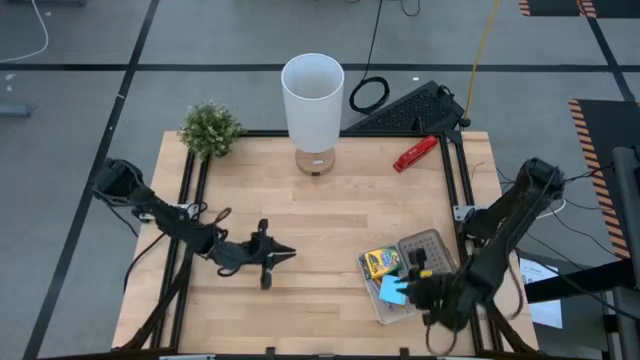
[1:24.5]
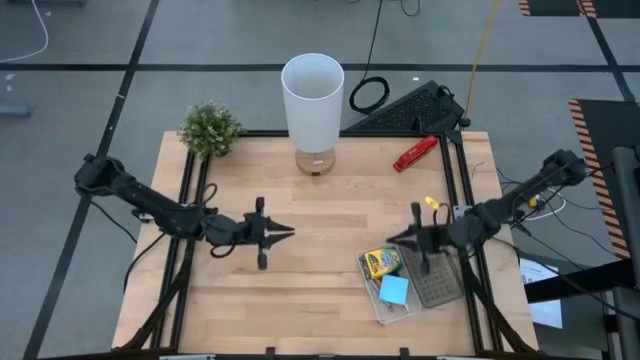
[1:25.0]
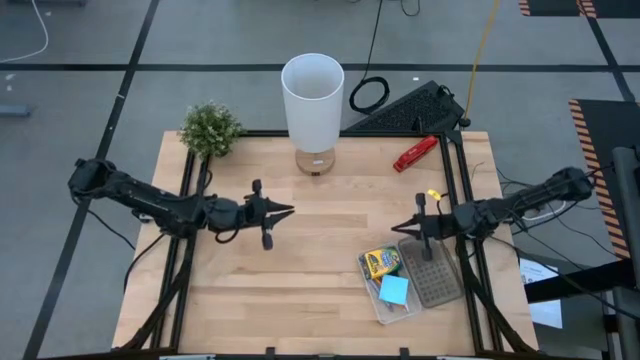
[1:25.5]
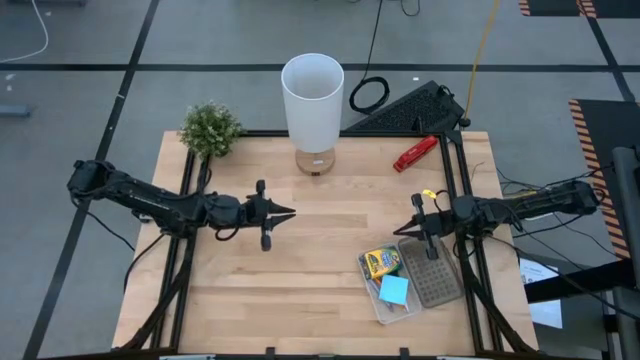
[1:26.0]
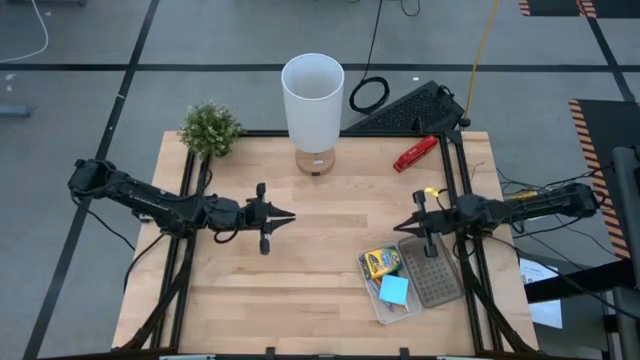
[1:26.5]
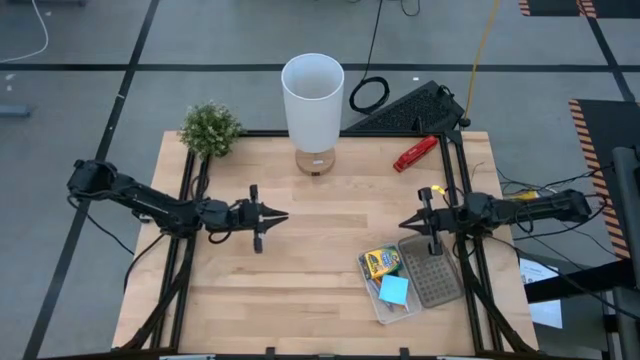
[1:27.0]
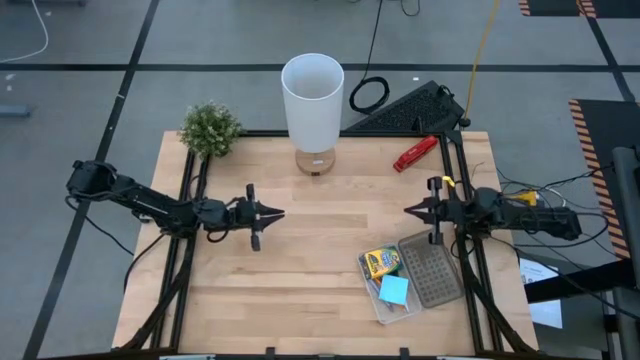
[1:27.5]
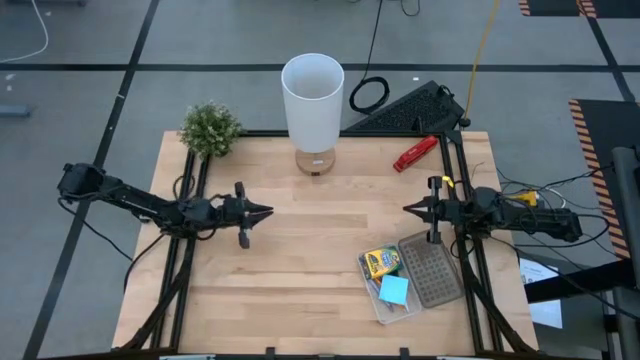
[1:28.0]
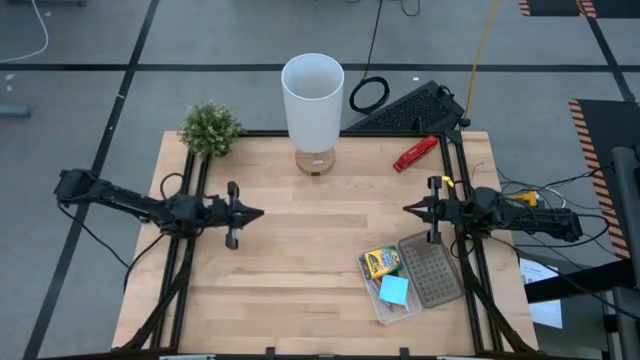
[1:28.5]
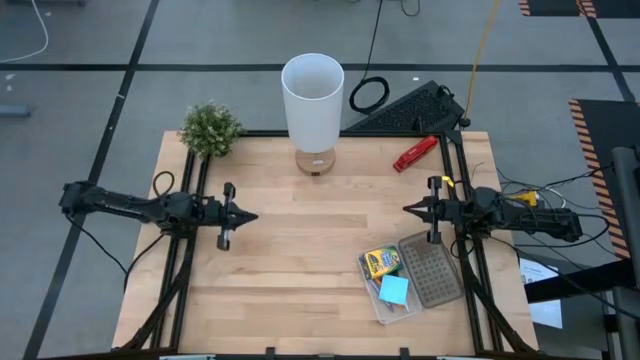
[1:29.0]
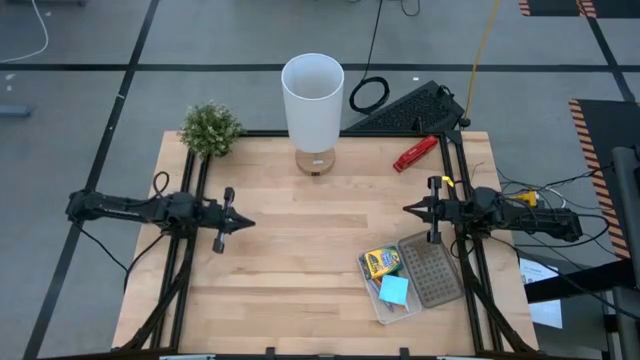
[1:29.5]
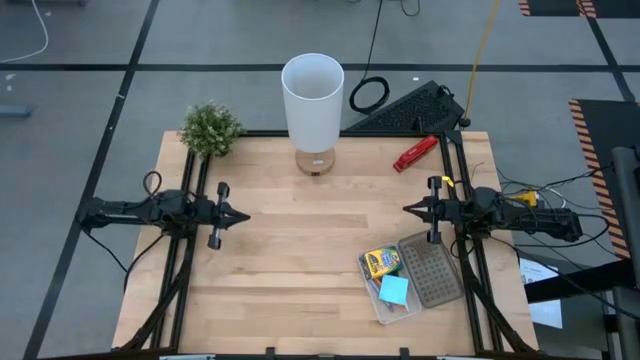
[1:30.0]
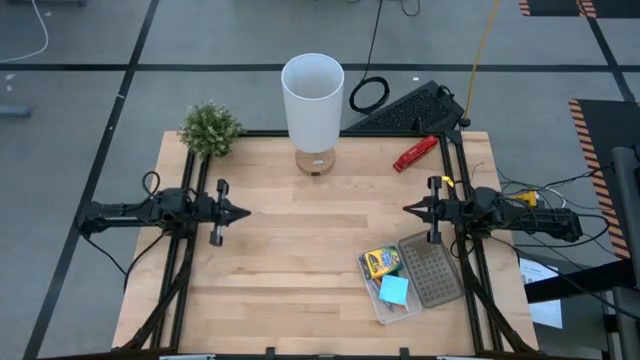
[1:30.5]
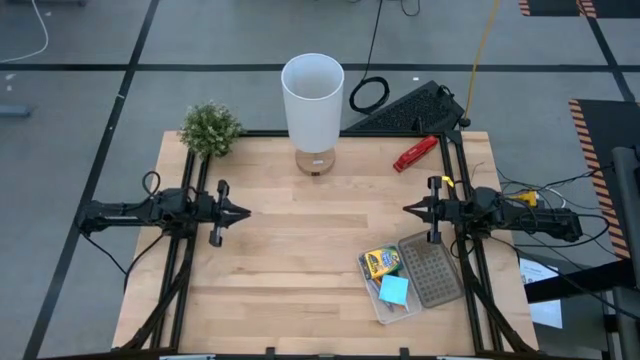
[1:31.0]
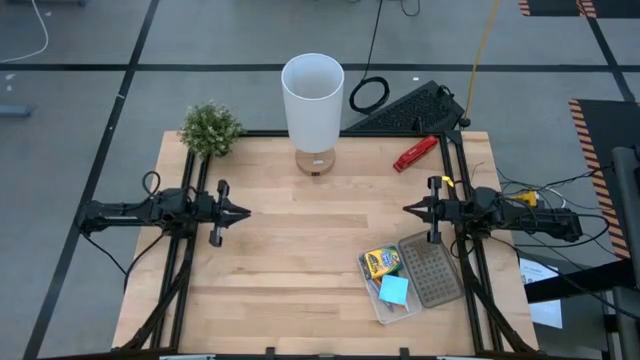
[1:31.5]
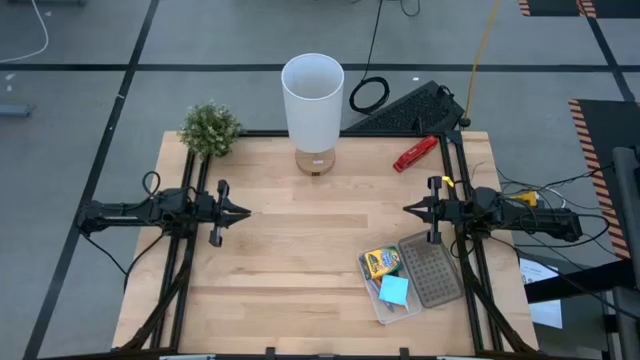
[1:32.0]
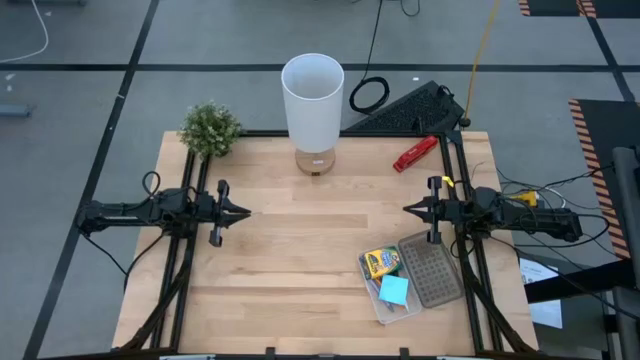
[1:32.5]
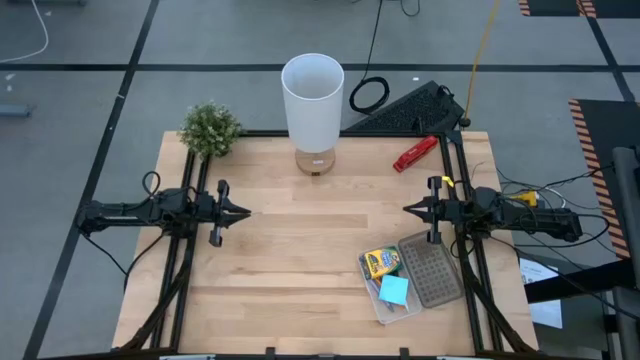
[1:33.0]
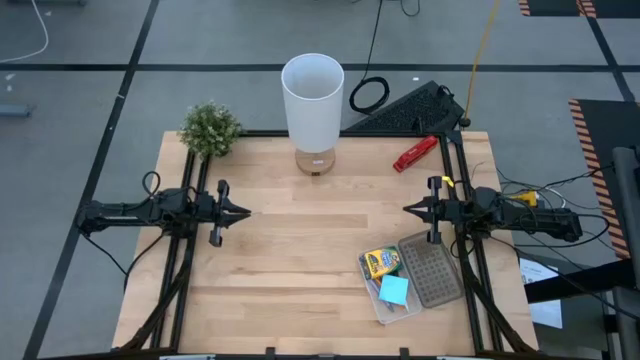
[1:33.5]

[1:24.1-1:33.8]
Task: Pack school essentials
Return to Home Position

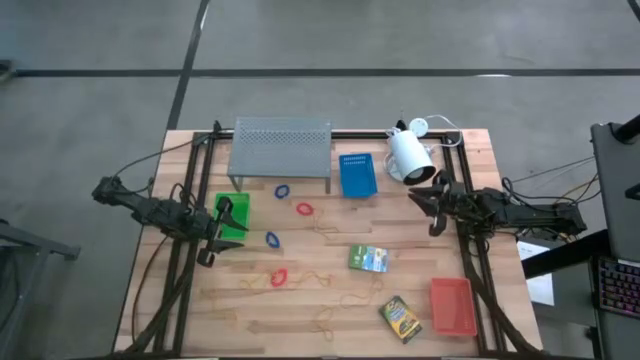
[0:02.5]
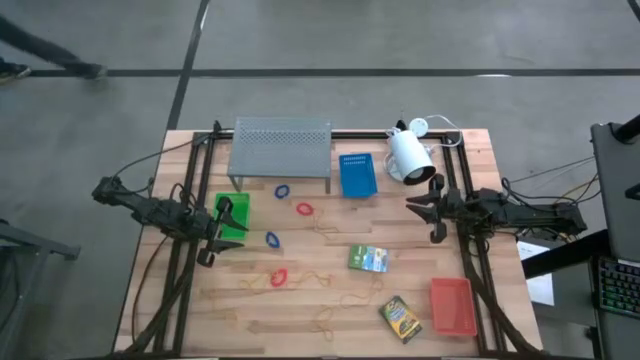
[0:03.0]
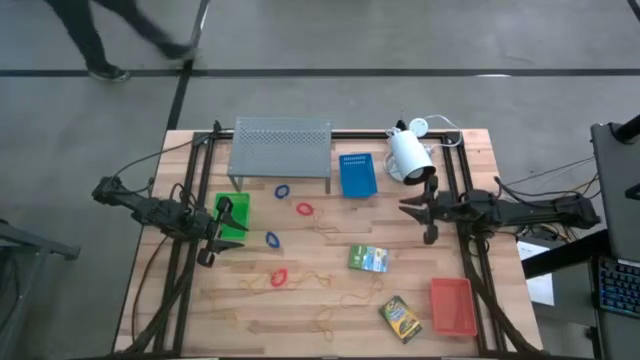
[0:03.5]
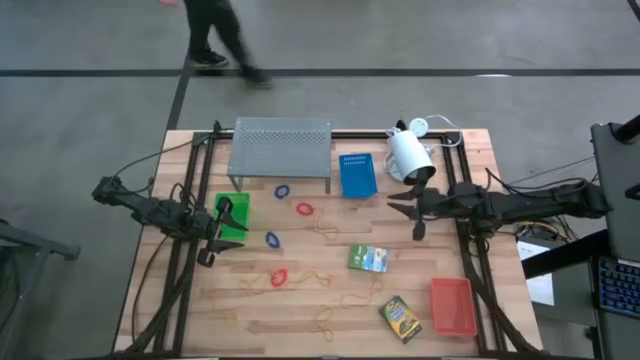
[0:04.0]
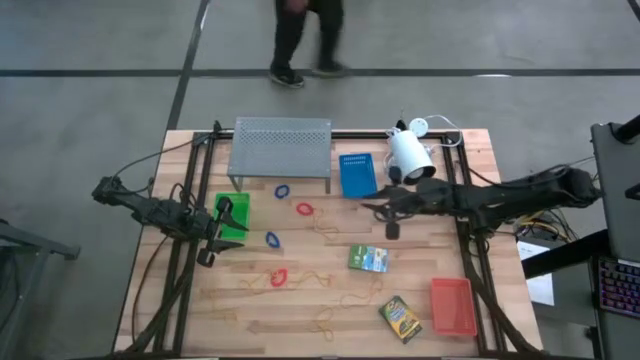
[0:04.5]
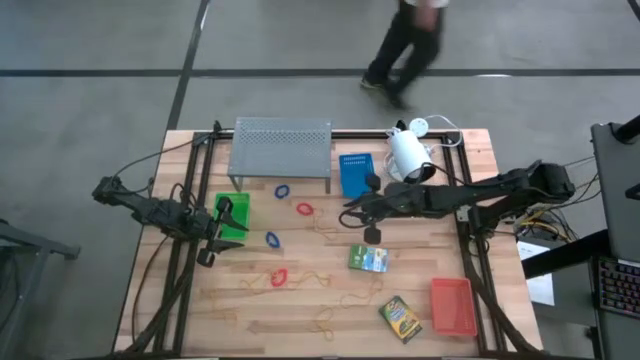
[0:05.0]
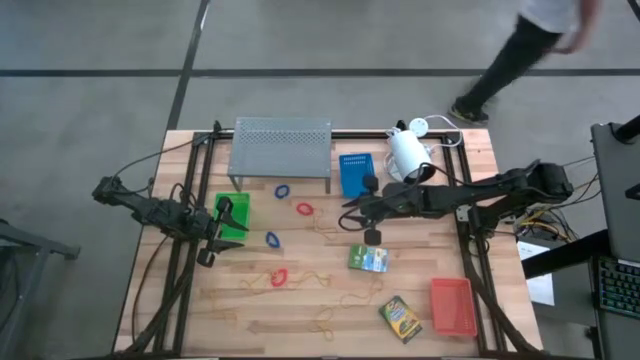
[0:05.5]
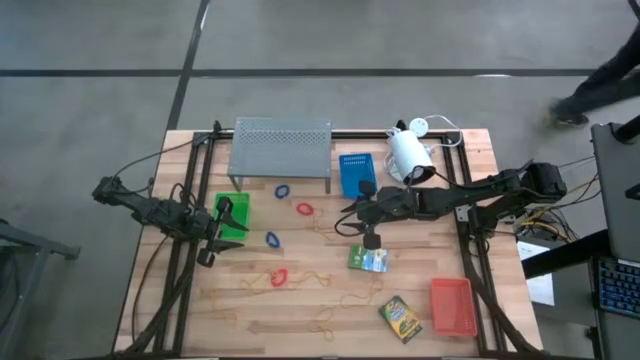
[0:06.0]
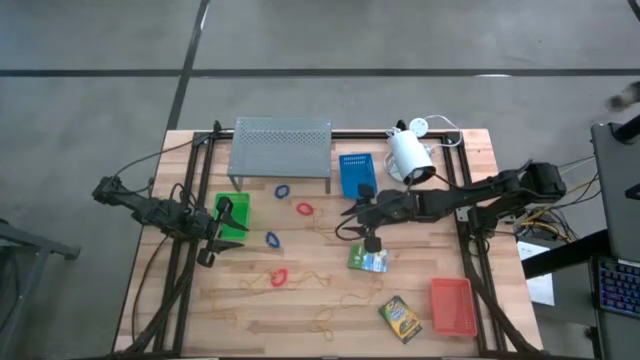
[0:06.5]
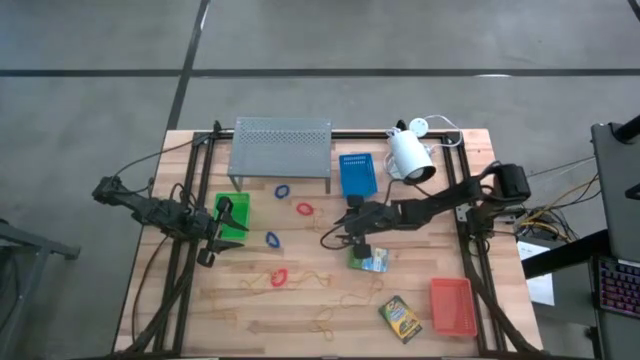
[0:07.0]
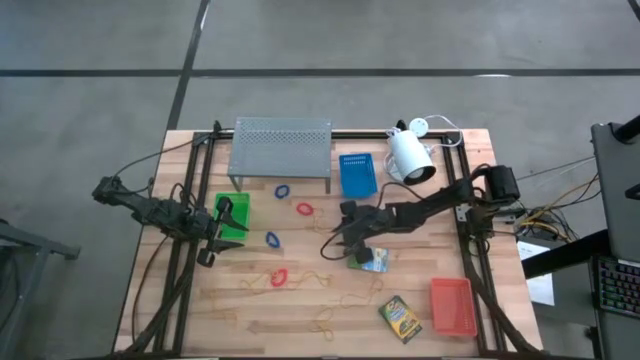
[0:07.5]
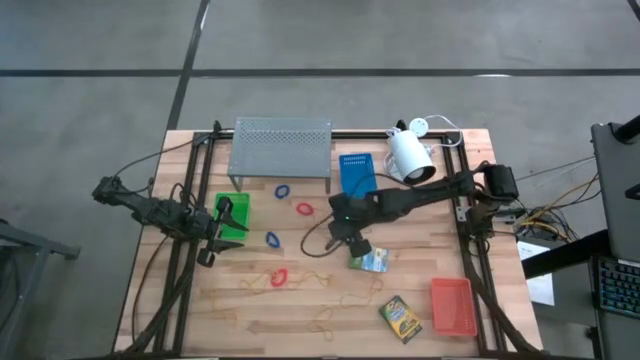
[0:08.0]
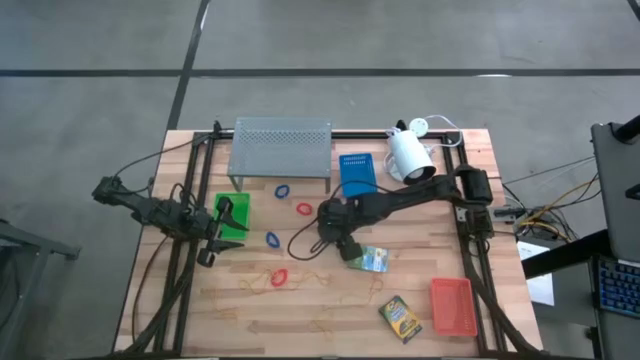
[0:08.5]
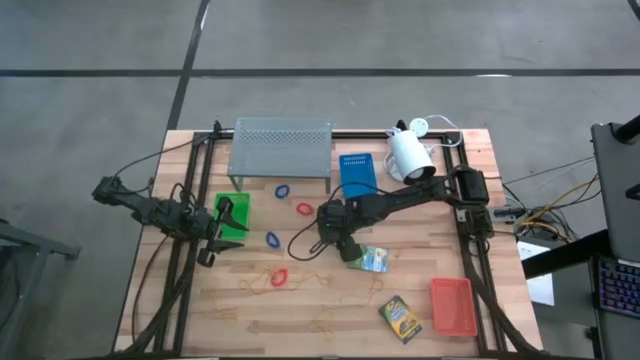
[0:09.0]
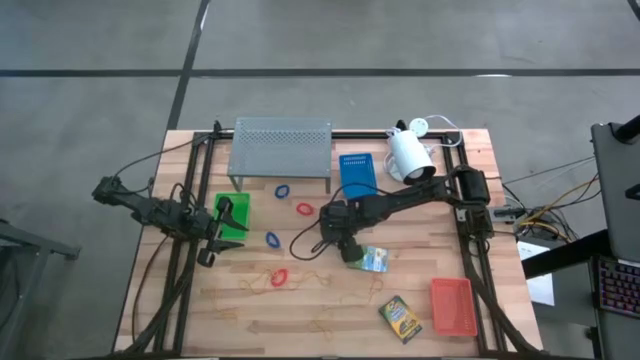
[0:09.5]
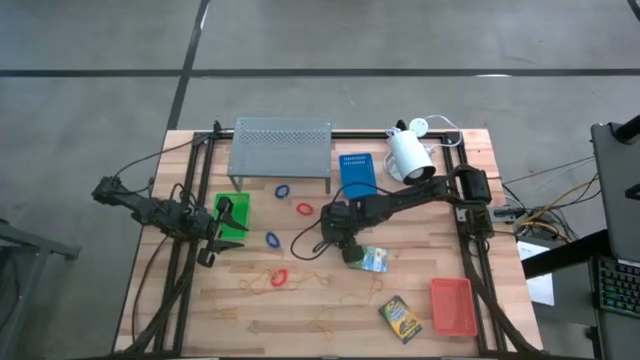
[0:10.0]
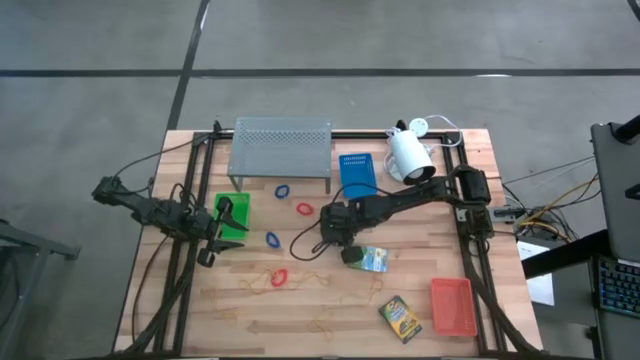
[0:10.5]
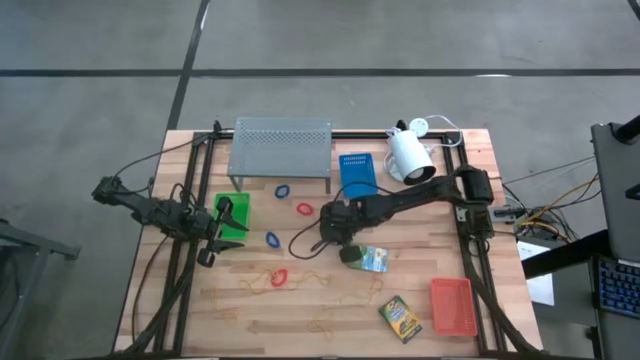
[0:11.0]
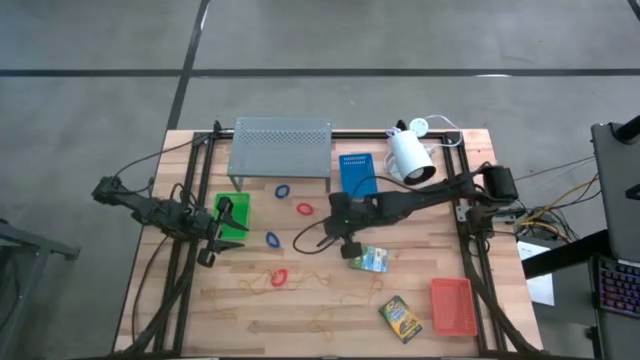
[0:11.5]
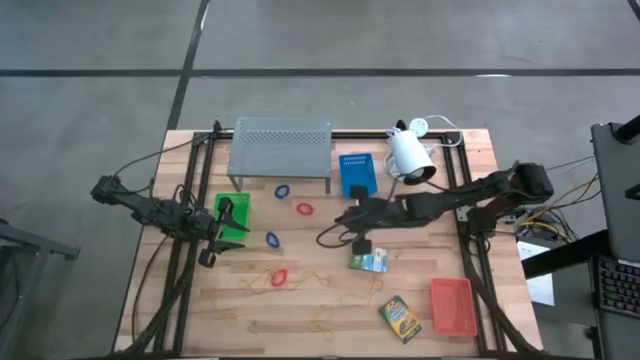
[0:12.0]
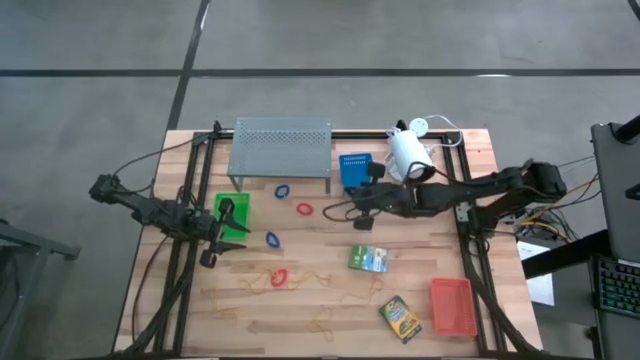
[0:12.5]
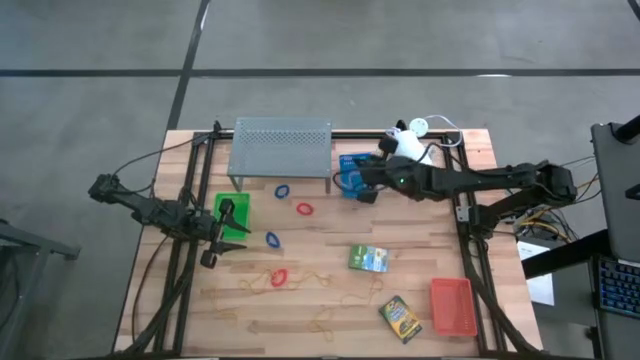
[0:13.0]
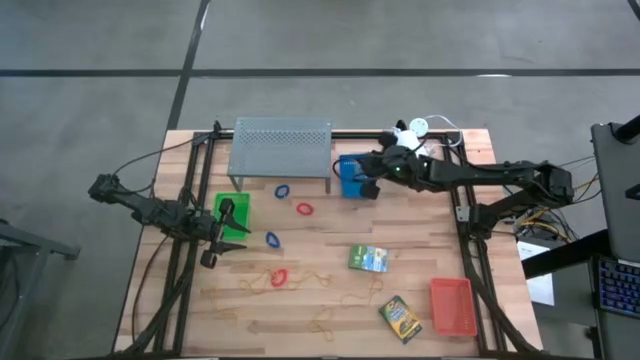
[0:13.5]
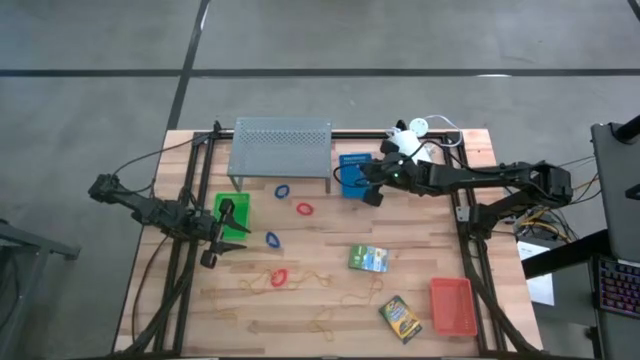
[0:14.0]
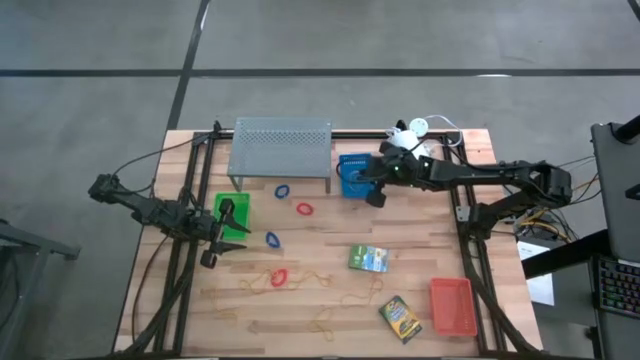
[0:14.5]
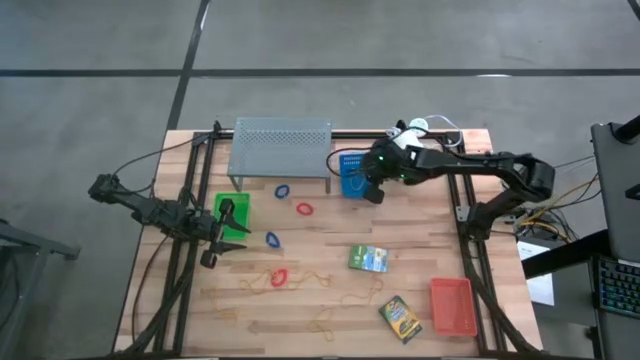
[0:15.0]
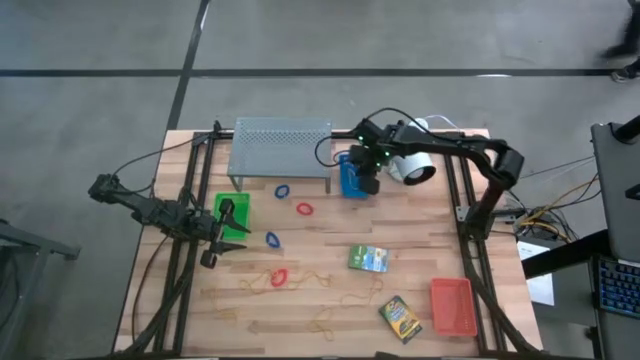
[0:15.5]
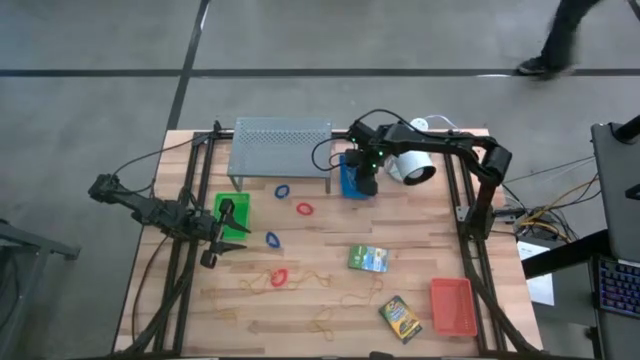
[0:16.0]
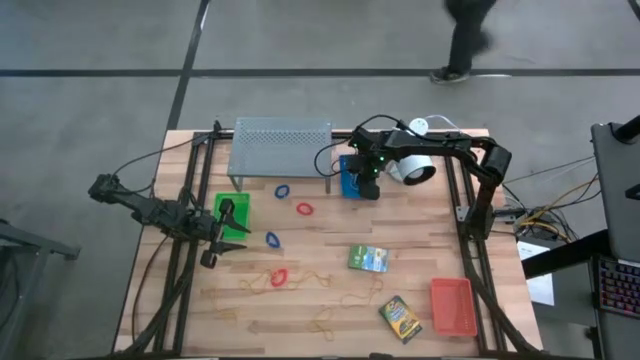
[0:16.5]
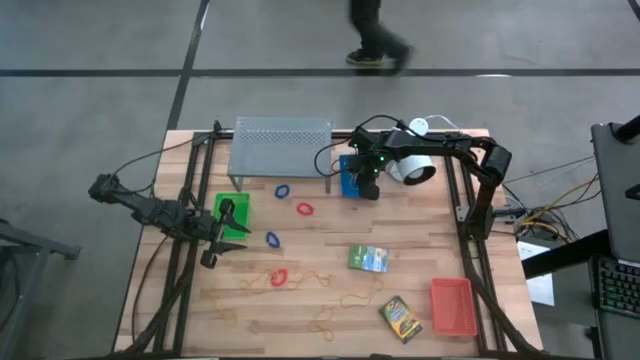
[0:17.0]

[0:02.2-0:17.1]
Task: Pick & Place Office Desk Supplies
Put the yellow rubber band into the blue bin
